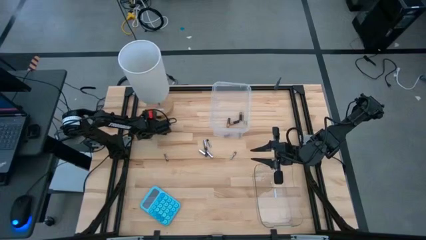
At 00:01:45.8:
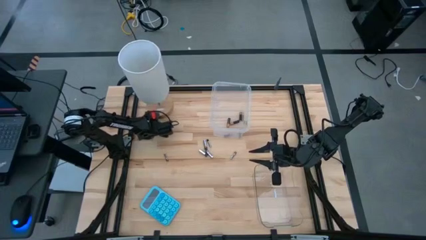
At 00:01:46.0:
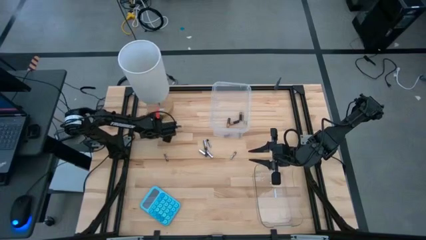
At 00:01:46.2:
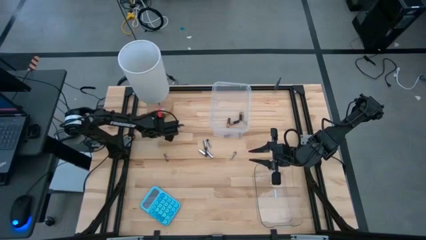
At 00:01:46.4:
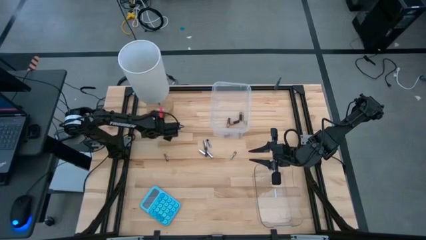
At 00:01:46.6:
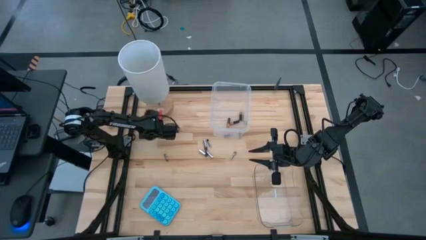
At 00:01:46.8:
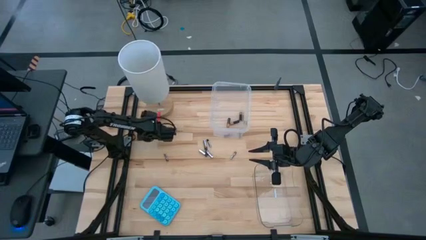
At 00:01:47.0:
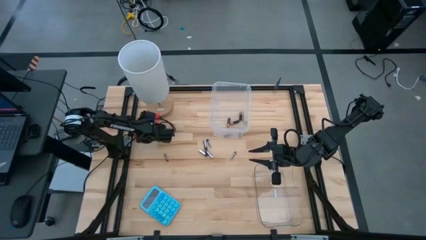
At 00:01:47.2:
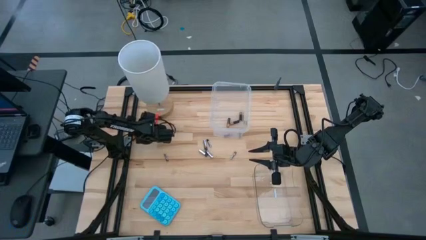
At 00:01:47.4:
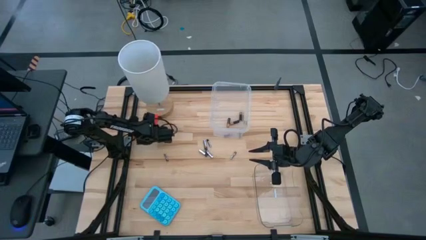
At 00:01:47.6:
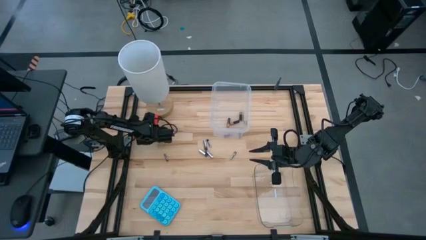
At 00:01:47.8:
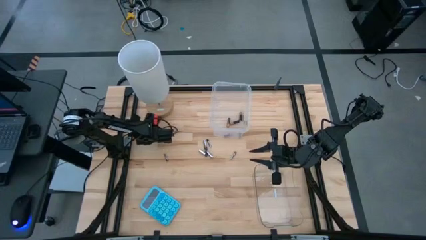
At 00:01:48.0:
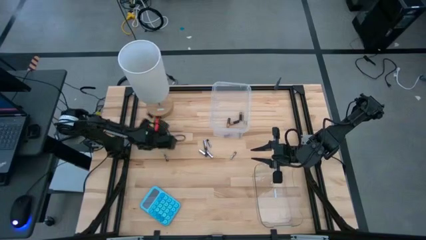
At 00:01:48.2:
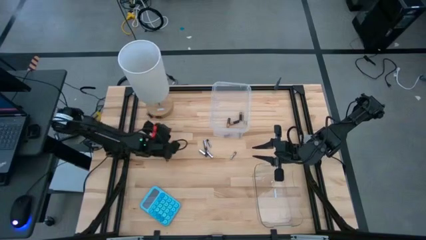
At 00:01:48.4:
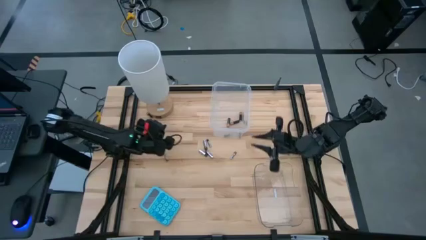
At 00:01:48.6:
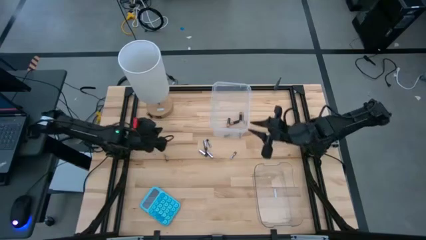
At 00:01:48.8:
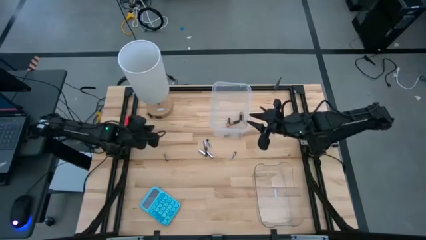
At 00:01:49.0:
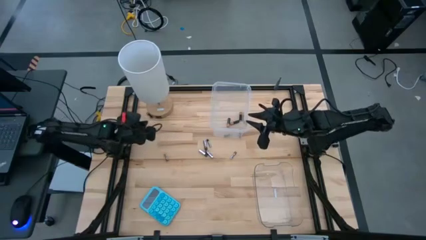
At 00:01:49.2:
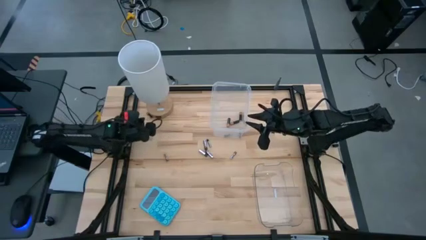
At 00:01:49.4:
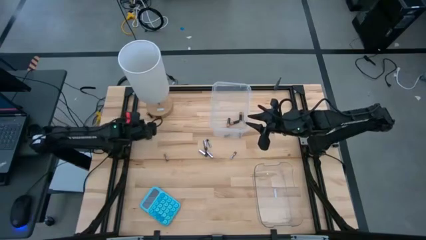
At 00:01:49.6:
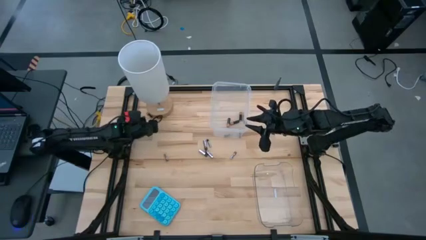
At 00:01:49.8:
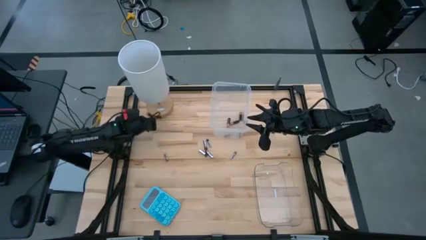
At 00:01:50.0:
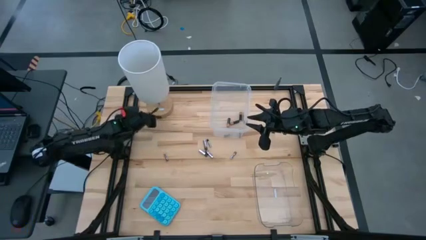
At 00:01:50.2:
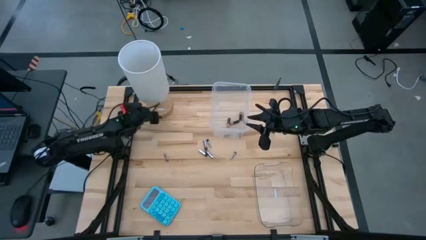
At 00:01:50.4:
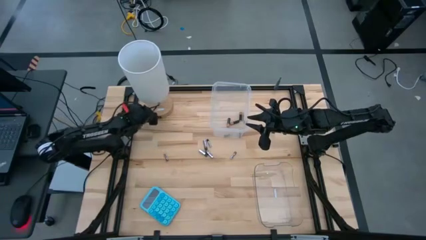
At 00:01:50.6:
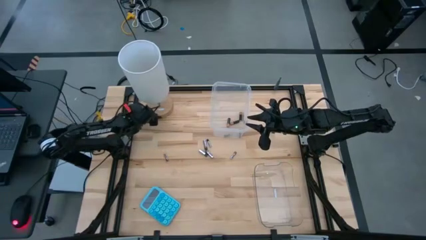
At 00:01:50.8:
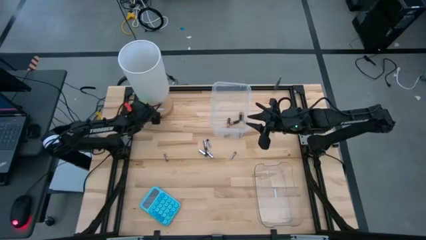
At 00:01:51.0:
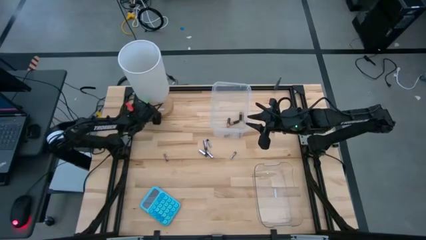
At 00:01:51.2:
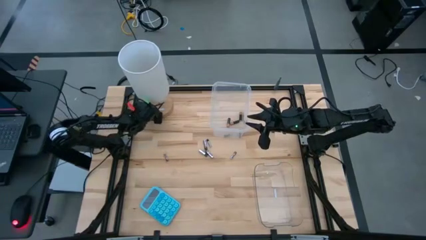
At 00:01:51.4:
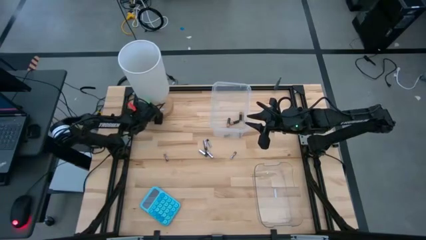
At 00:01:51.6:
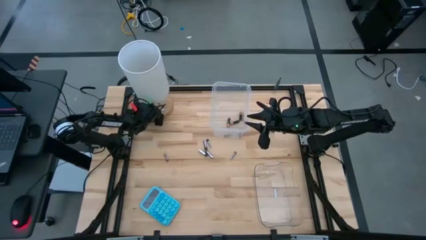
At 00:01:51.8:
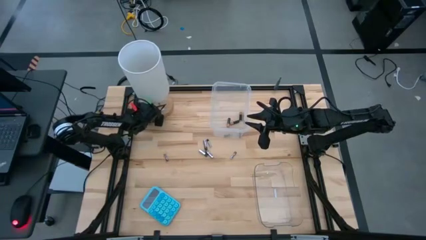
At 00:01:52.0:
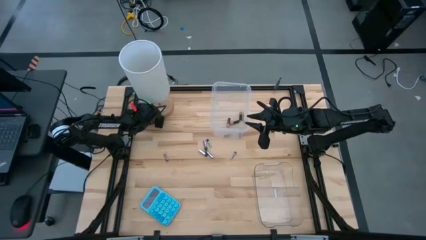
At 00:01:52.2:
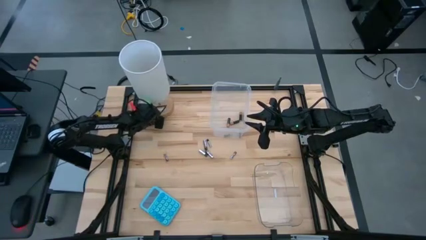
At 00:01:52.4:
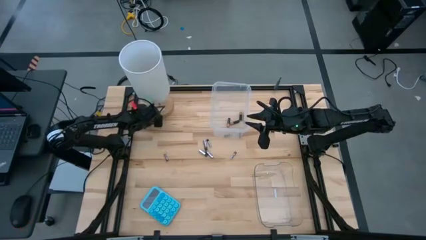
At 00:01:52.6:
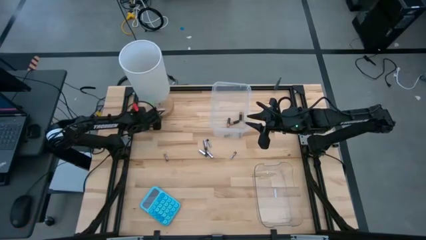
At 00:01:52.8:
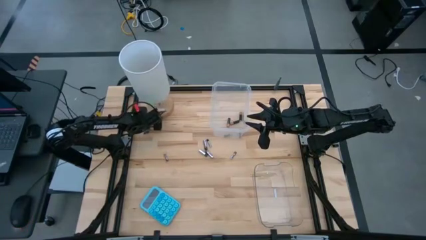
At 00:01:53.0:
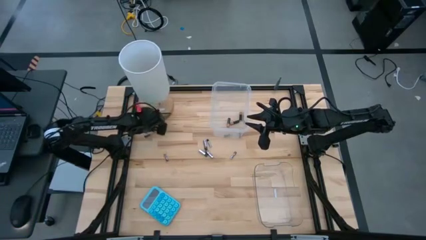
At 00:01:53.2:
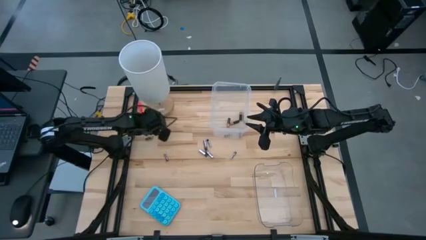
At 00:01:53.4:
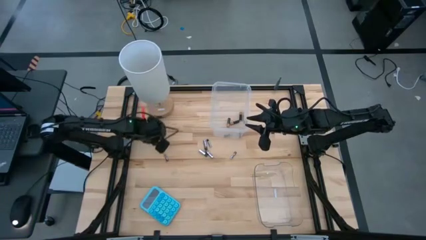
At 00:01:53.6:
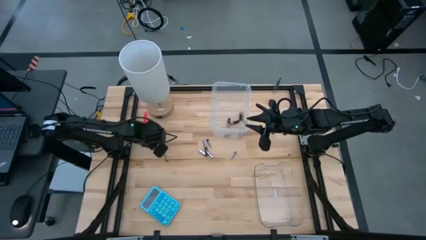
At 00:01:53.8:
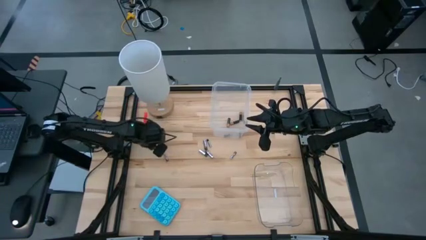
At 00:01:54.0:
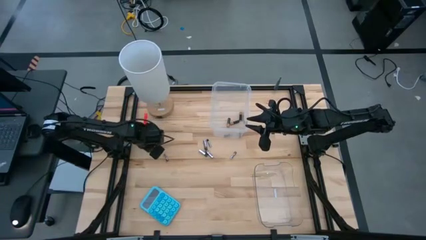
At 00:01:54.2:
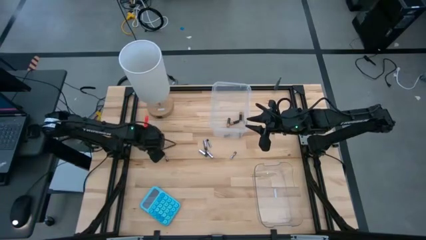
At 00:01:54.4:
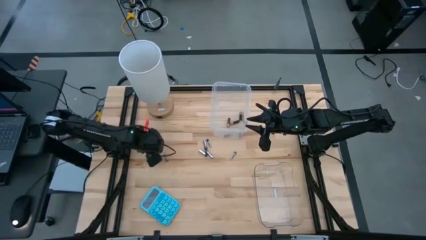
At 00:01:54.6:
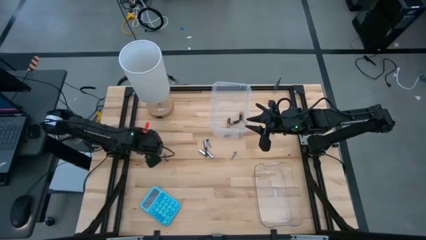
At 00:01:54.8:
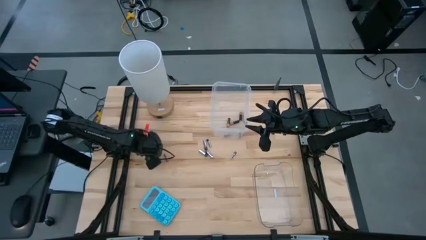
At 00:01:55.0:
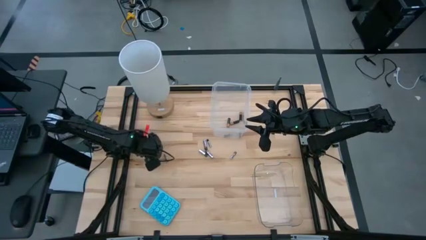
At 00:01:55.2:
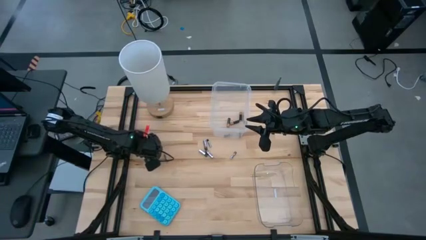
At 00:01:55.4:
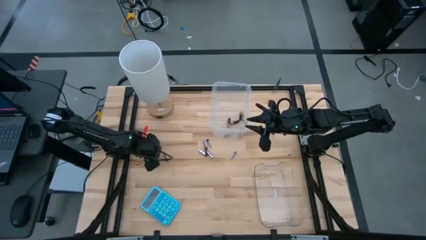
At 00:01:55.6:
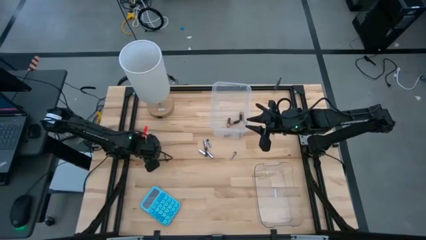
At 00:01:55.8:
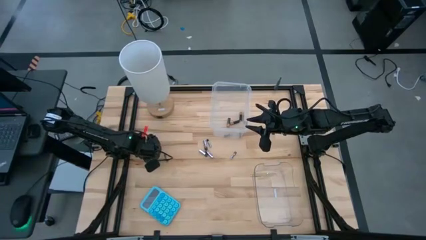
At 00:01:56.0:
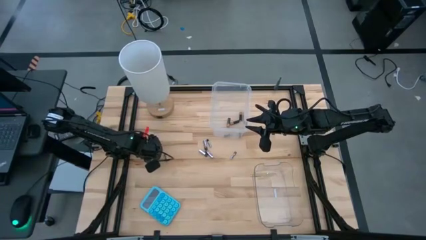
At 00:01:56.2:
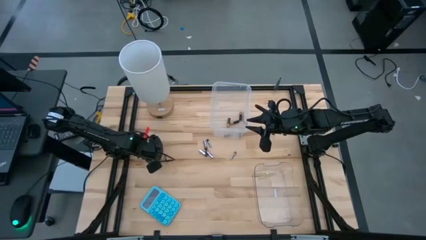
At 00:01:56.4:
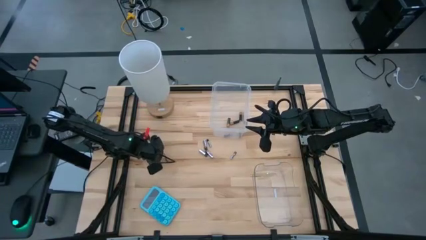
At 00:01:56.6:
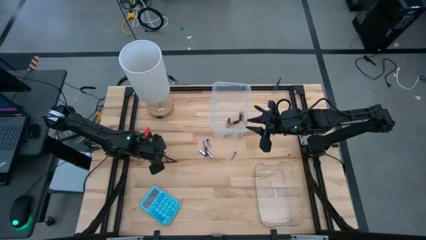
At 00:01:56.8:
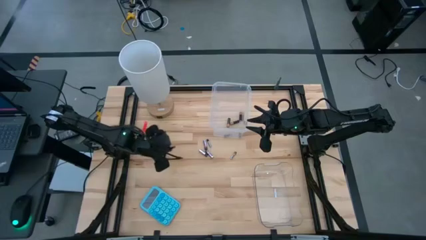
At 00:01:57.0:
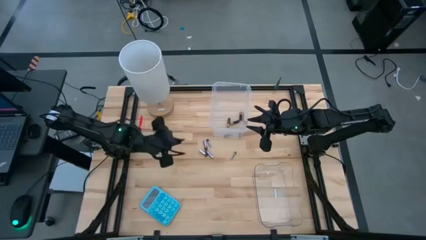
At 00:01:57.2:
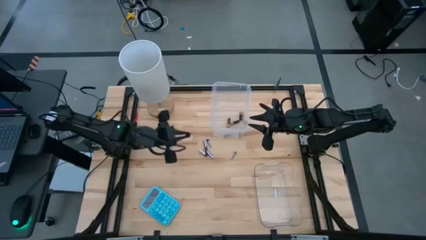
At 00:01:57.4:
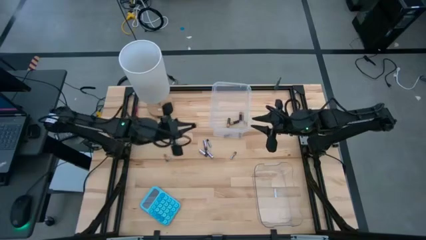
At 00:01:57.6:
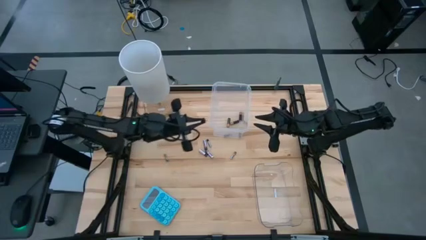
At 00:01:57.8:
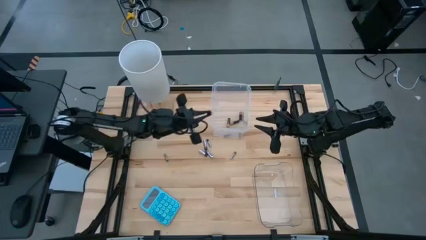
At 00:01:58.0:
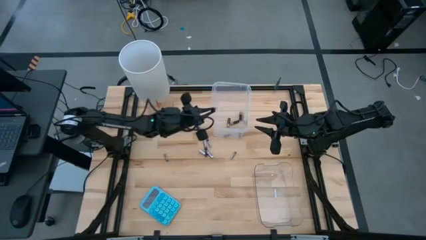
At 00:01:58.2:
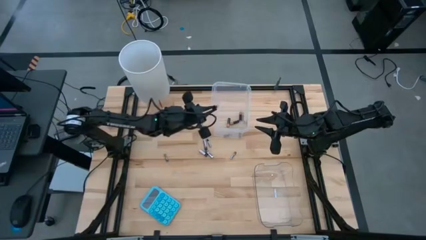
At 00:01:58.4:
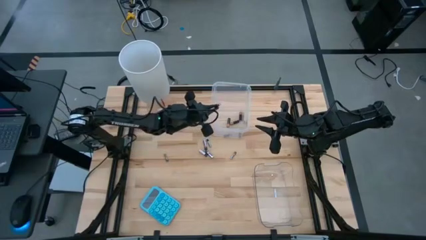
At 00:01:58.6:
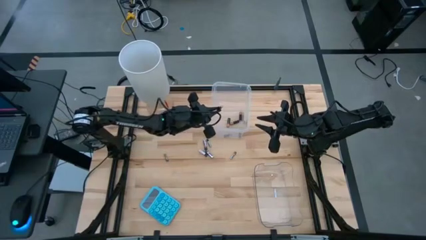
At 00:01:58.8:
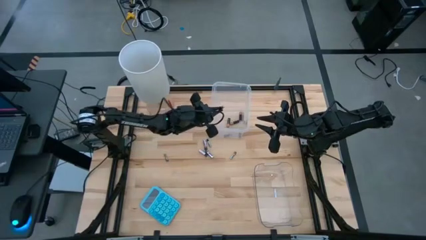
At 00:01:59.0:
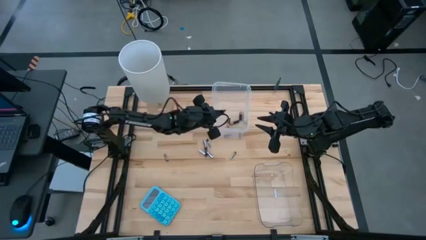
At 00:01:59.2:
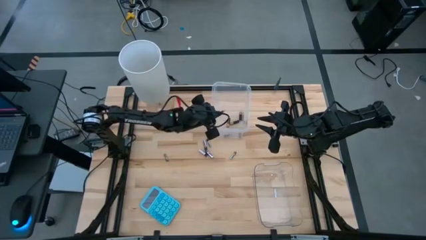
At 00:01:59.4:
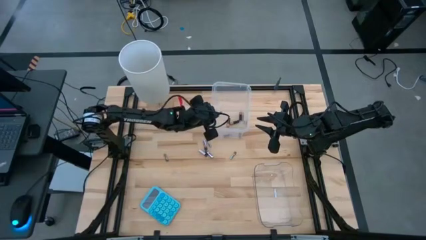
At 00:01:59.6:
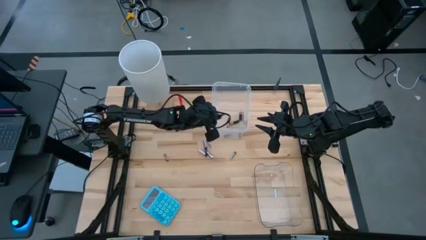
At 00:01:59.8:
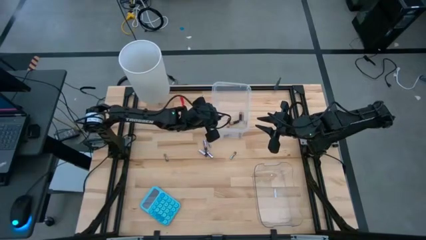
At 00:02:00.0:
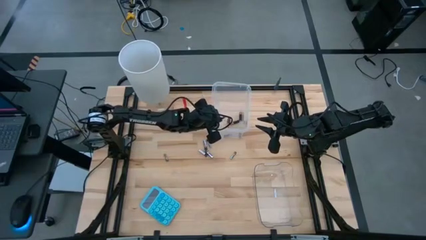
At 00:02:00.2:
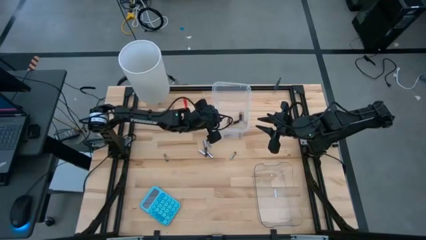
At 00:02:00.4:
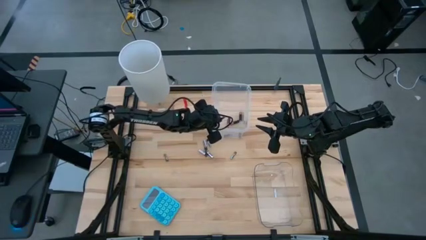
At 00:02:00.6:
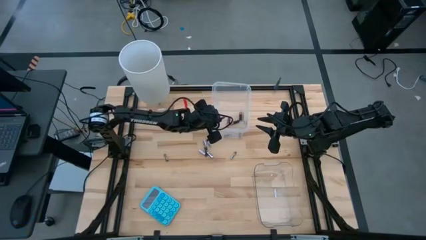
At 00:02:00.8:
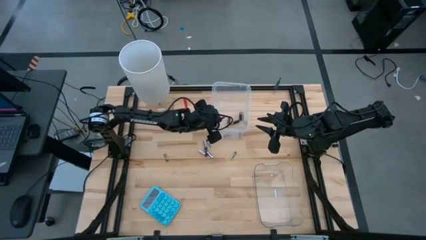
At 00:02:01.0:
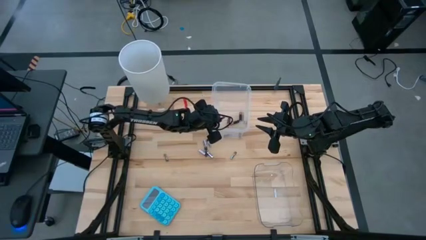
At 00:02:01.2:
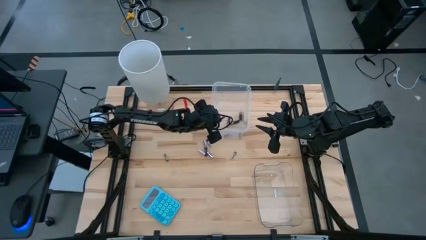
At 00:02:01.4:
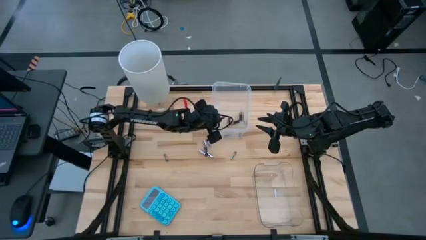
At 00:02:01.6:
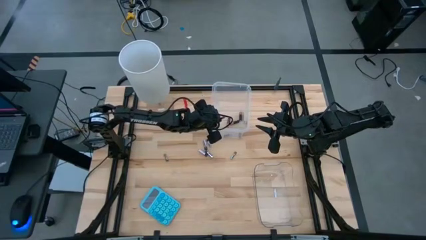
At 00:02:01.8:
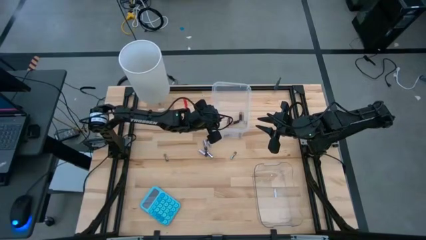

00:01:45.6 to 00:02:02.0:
Task: Sort batteries
Put the brown battery into the top transparent bin
